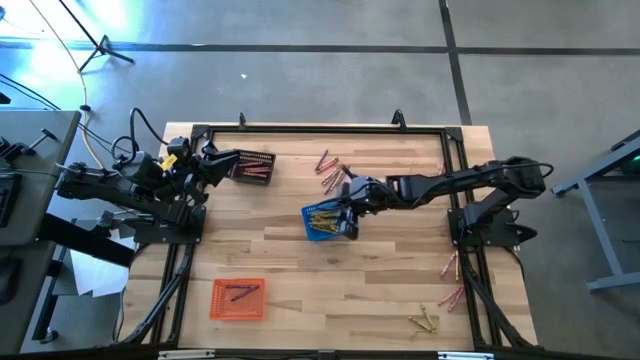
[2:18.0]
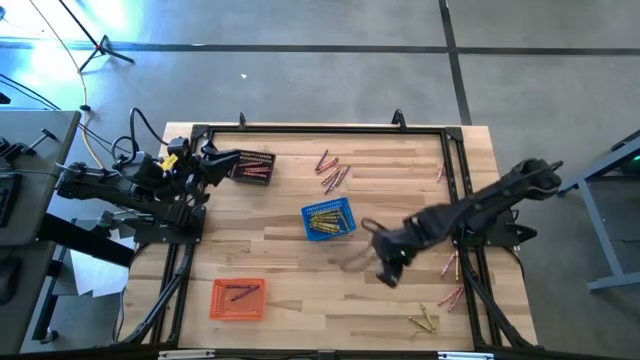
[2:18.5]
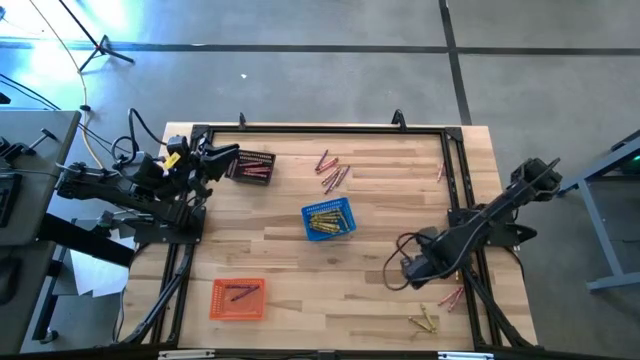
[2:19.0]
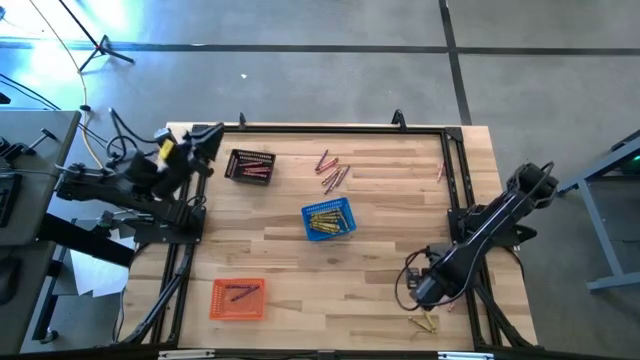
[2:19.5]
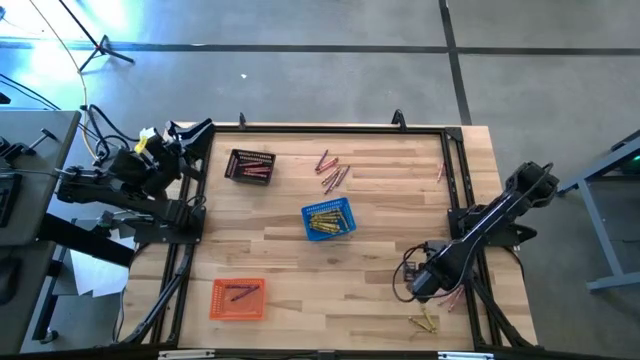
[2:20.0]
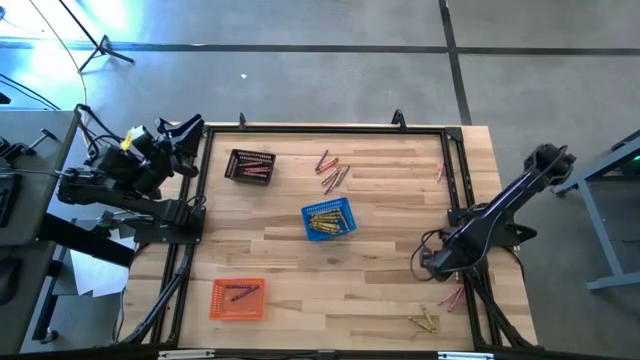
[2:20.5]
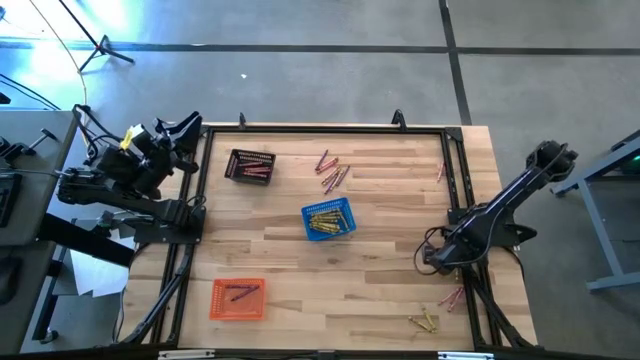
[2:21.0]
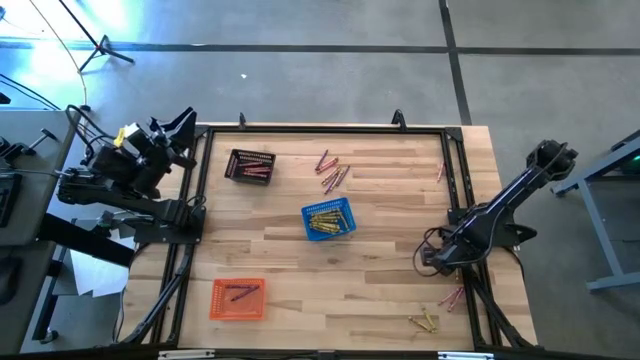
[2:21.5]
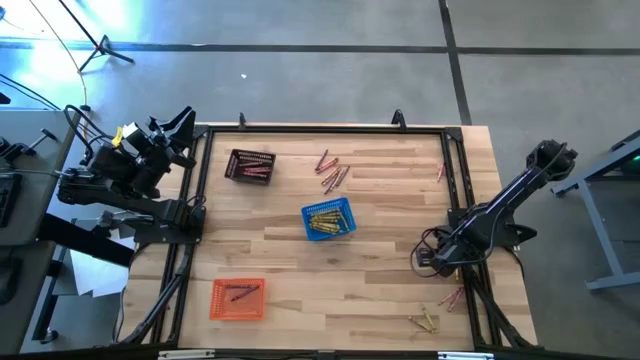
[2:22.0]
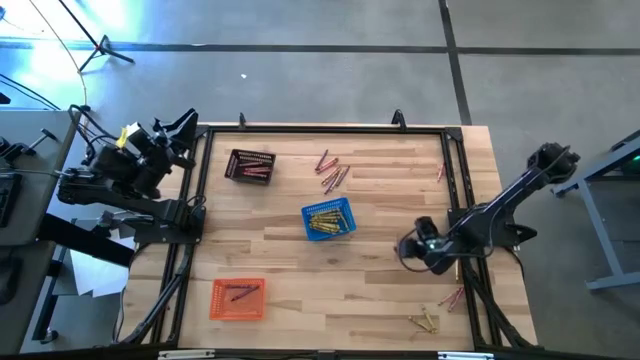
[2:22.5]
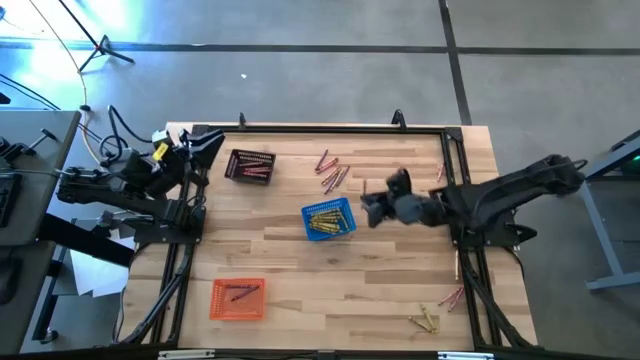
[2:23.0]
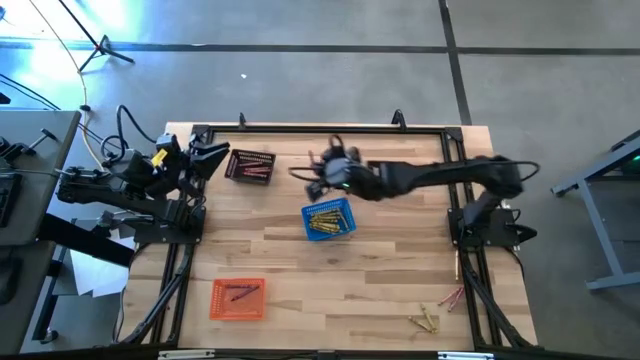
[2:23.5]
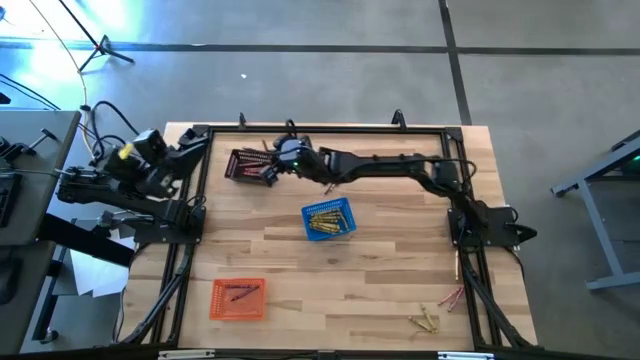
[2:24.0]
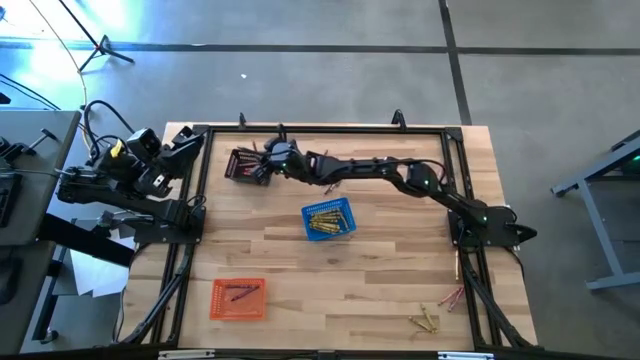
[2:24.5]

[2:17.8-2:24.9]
Task: Sort crayons
Put the red crayon into the black basket

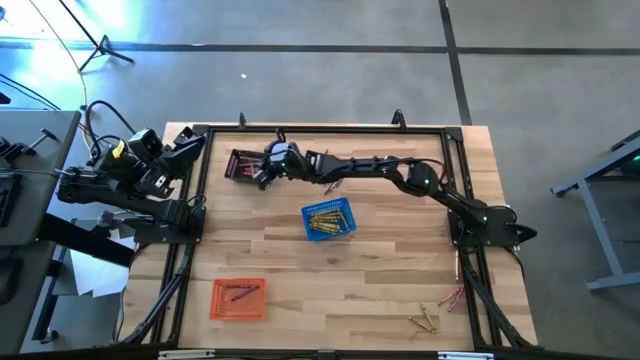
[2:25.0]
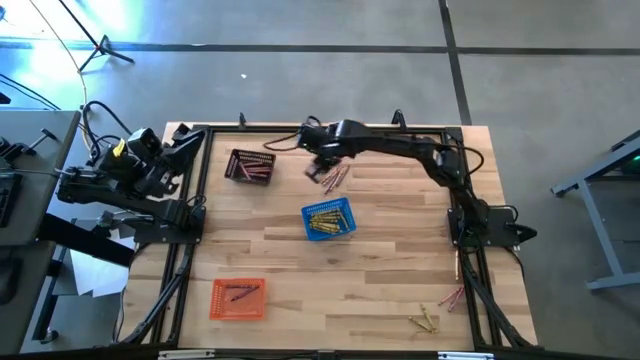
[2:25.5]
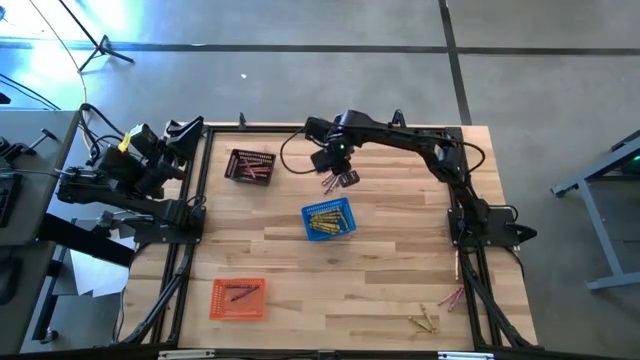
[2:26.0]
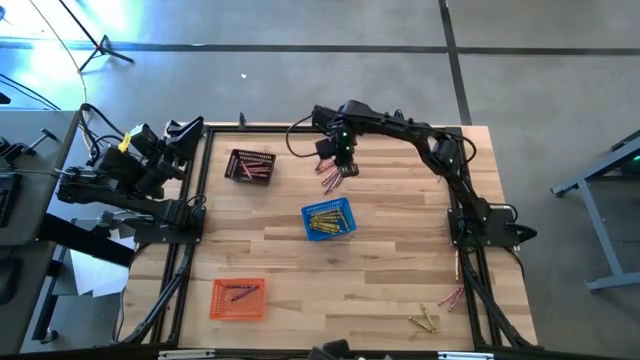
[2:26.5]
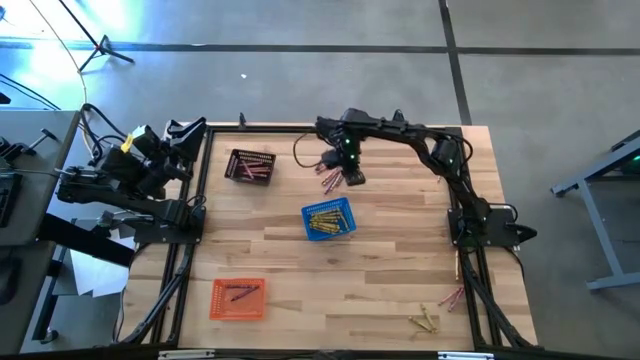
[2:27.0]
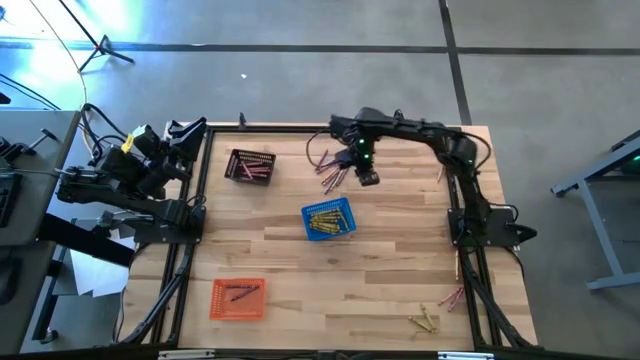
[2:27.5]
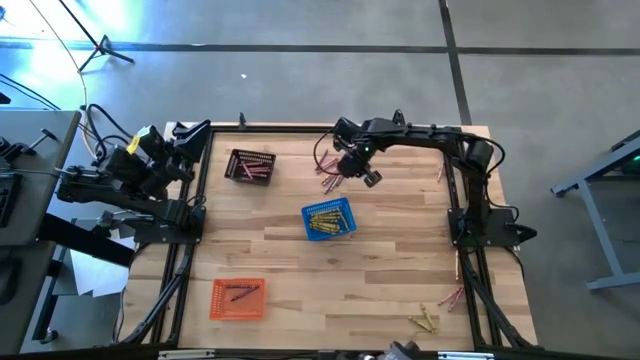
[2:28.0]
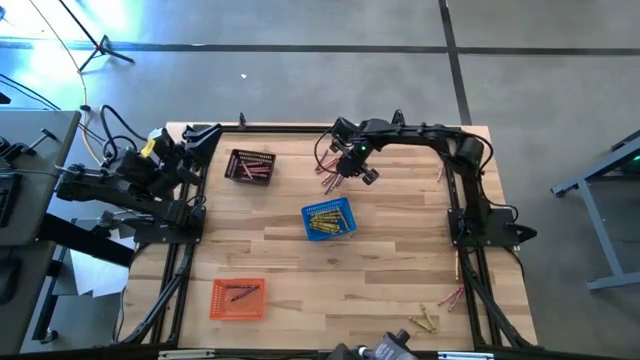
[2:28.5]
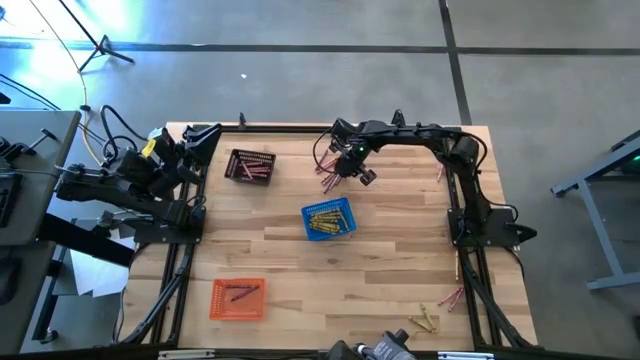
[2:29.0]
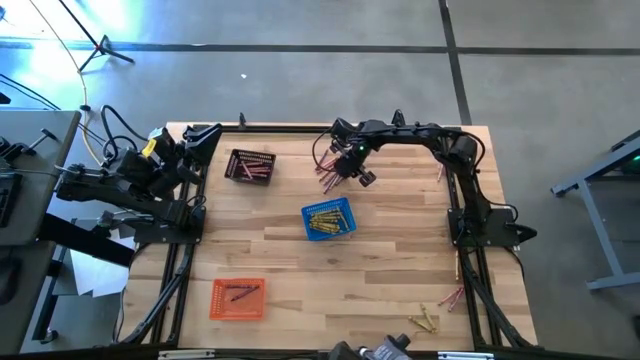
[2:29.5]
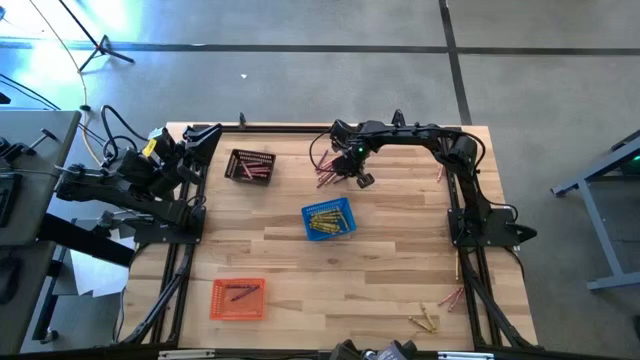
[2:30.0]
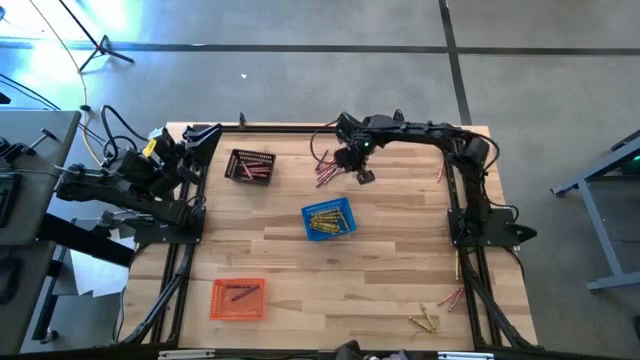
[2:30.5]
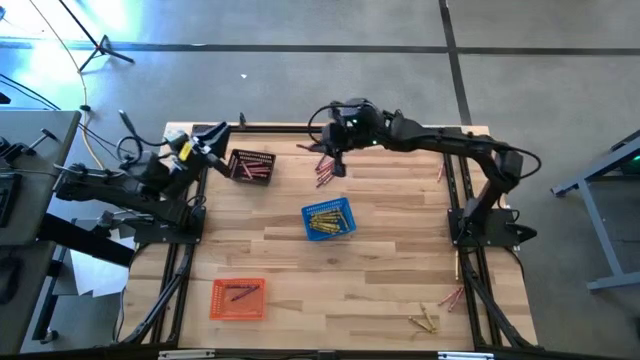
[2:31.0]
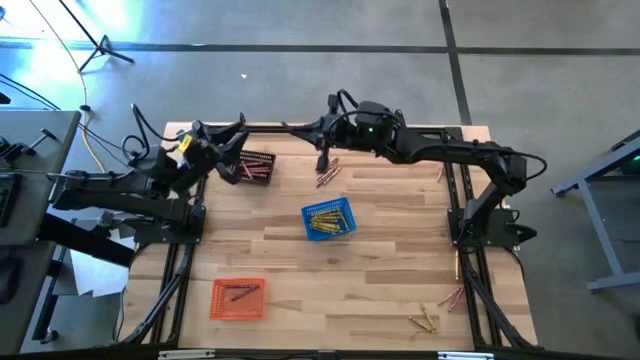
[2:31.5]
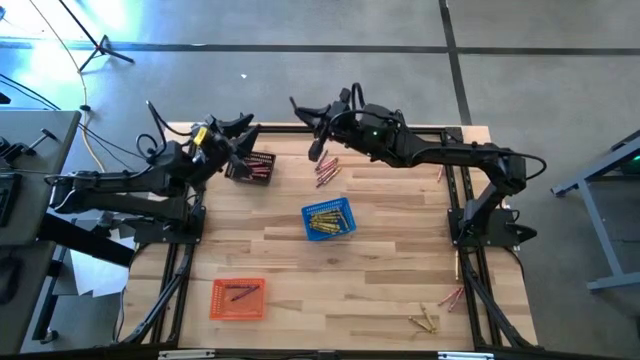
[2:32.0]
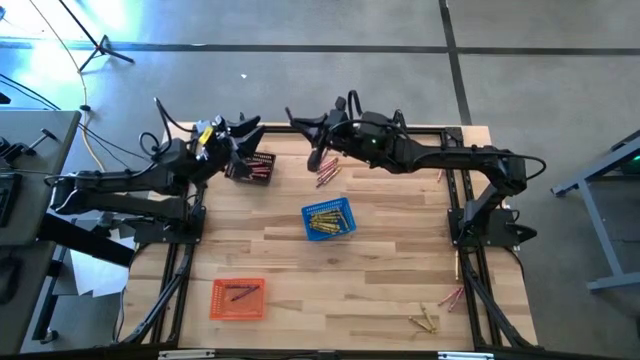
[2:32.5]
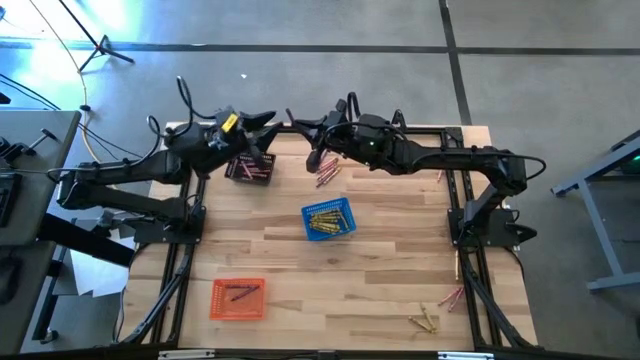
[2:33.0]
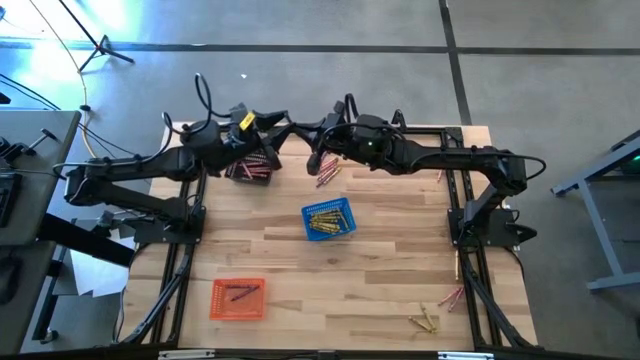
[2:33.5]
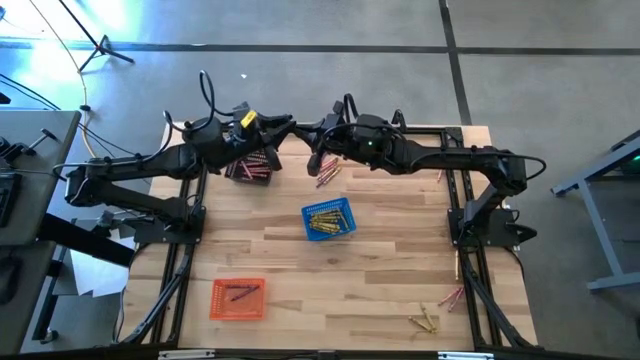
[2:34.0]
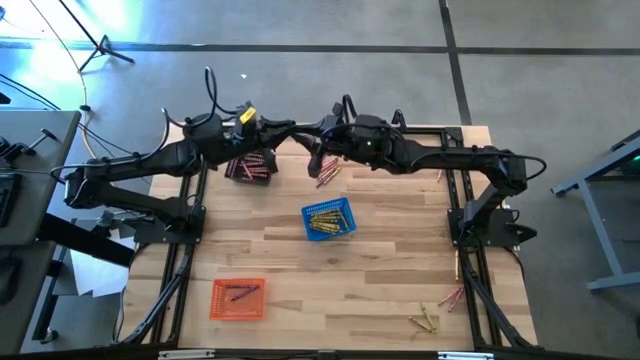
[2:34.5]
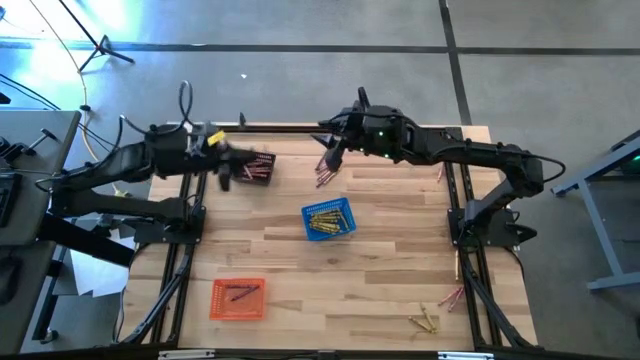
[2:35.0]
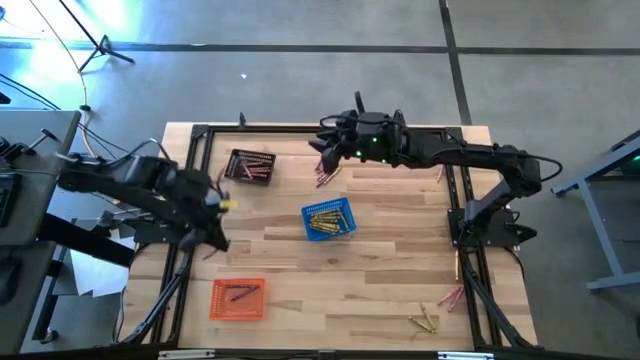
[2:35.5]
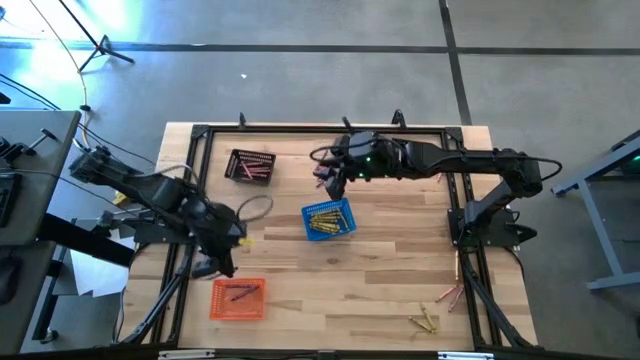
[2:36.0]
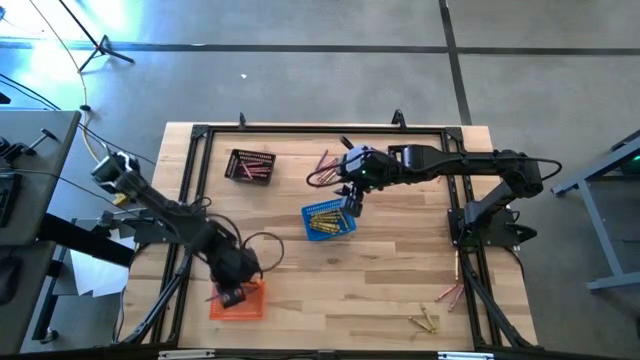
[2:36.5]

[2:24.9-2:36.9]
Put the violet crayon into the orange basket

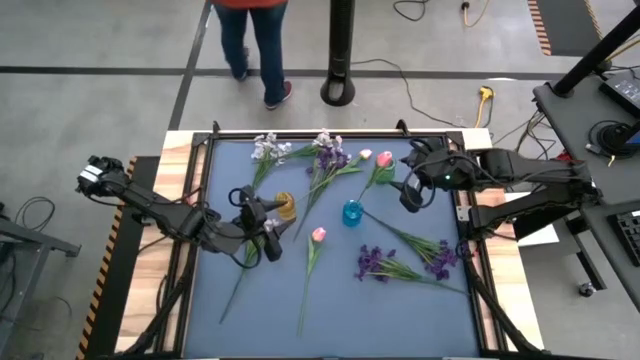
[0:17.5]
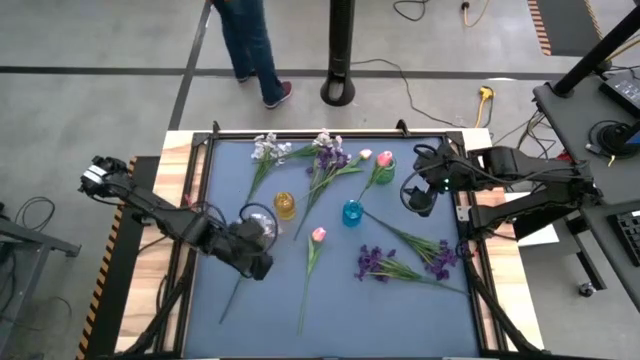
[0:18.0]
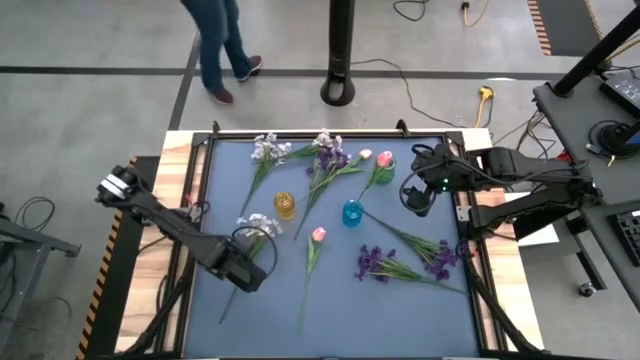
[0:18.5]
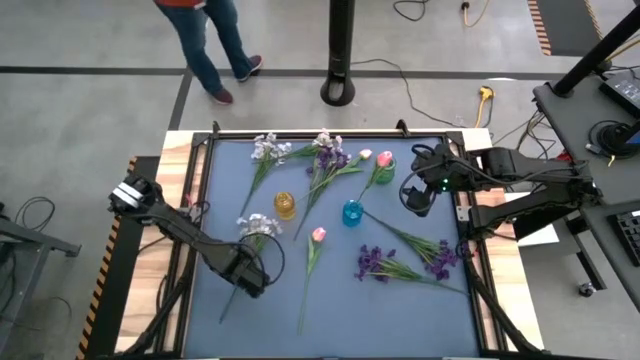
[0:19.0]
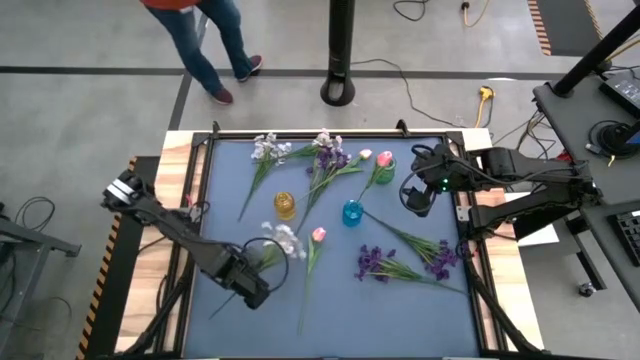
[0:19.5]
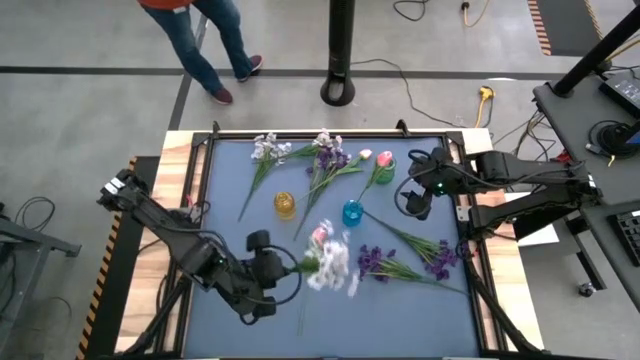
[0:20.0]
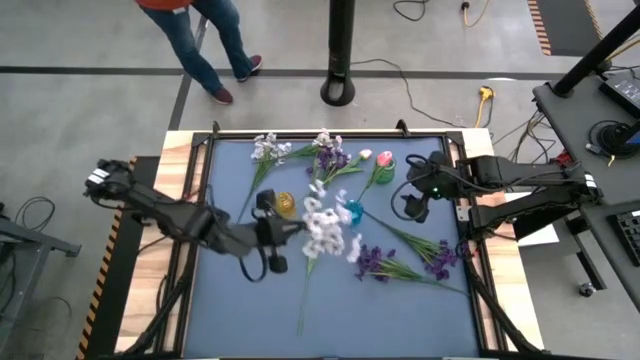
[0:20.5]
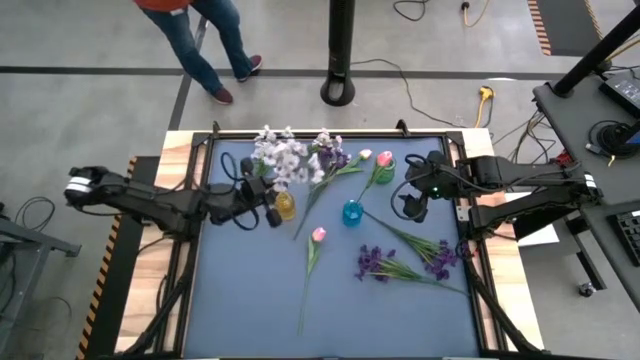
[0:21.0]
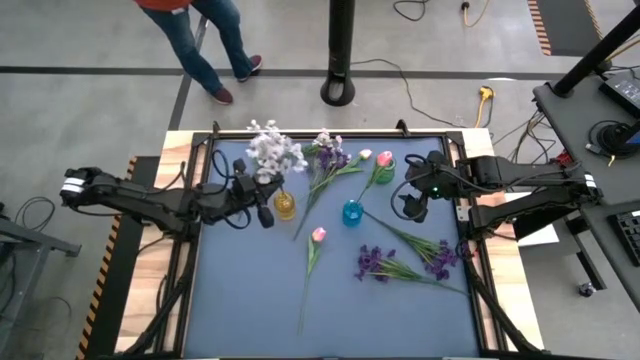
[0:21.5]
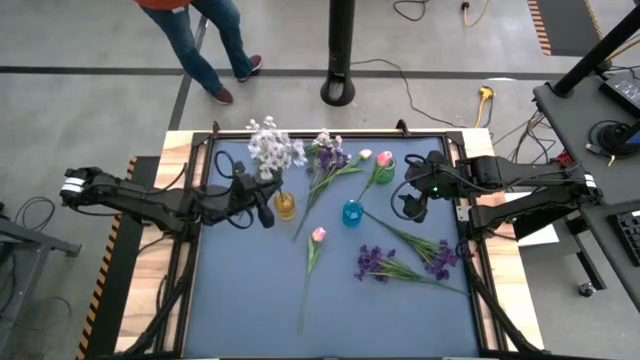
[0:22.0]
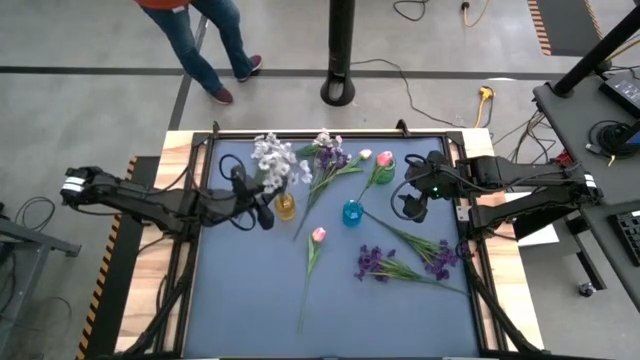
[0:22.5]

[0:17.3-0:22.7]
Task: Sort flowers into vase by color
Put the bottom white flowers into the yellow flower vase
